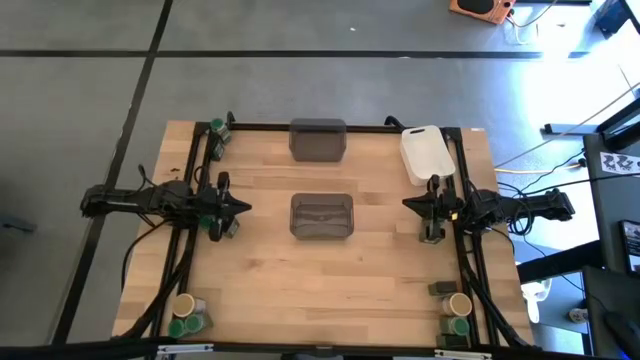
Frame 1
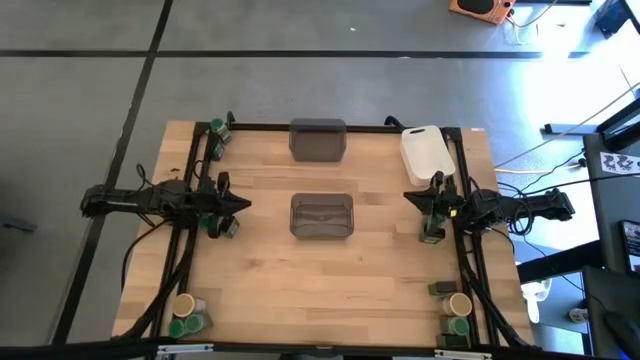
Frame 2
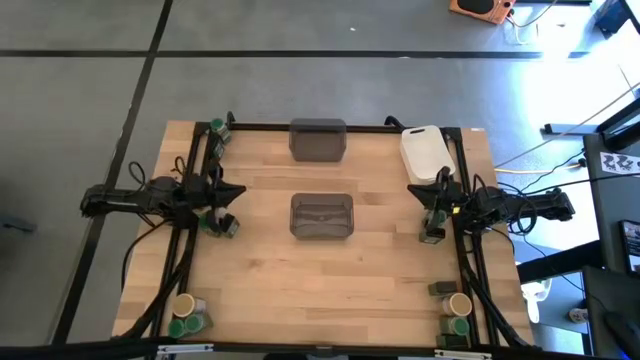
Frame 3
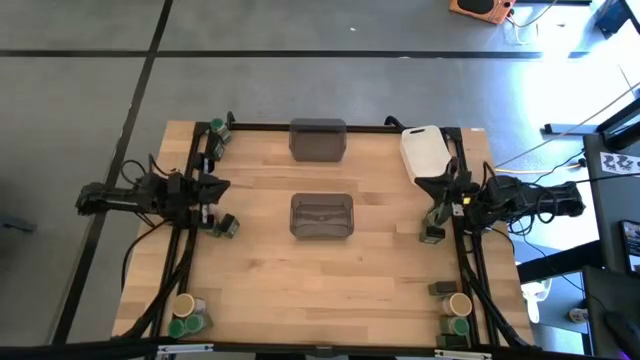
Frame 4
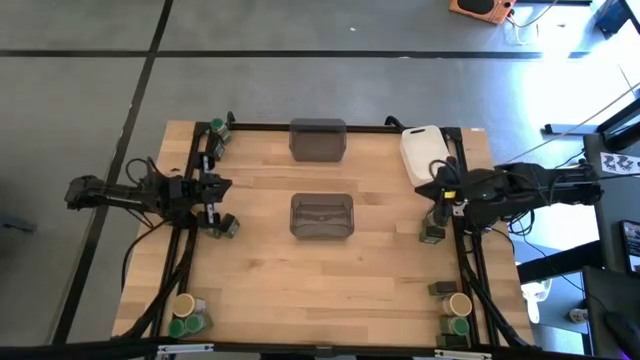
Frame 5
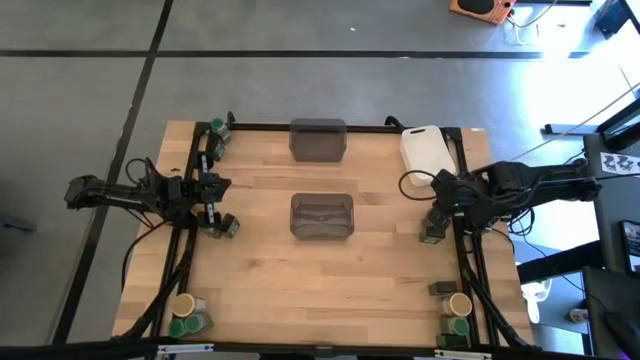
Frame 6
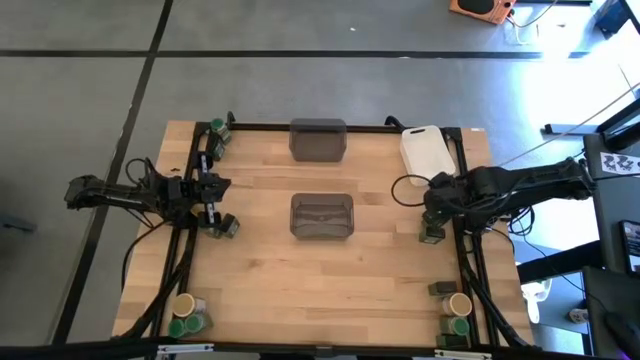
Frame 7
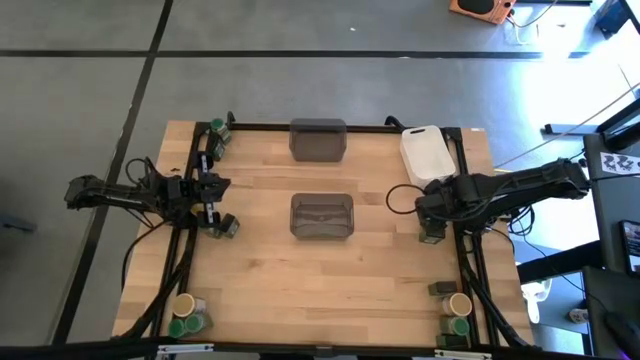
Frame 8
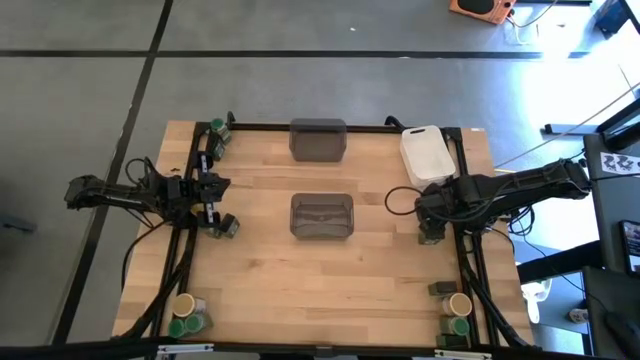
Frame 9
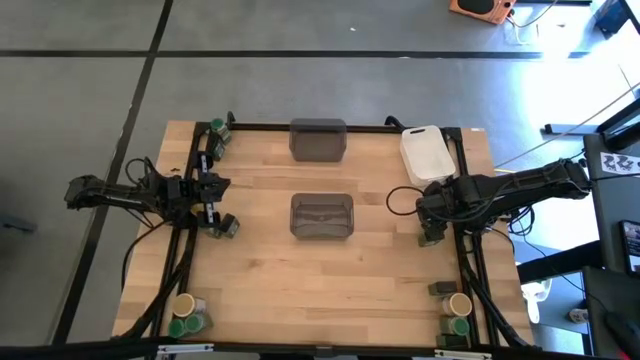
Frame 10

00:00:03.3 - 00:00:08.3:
Task: Sort spices by type
Put the green seasoning bottle into the white bin

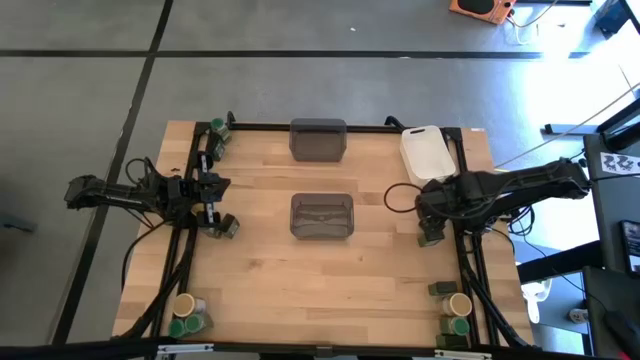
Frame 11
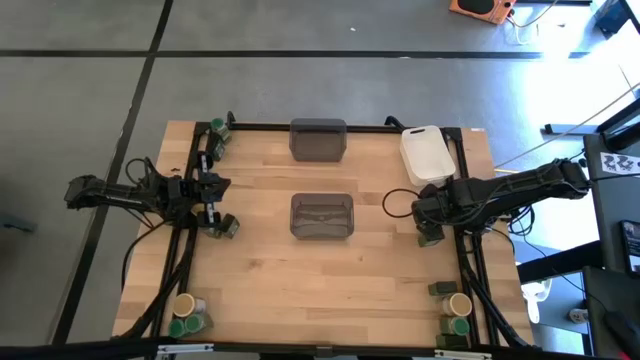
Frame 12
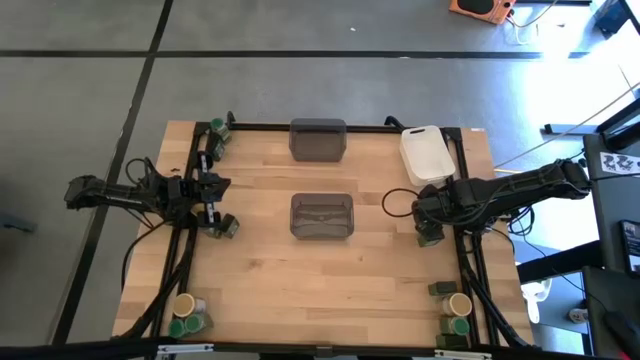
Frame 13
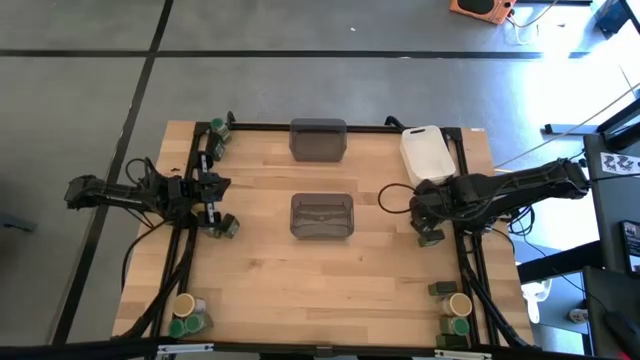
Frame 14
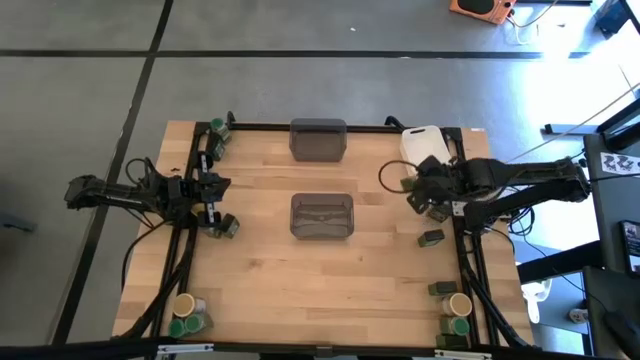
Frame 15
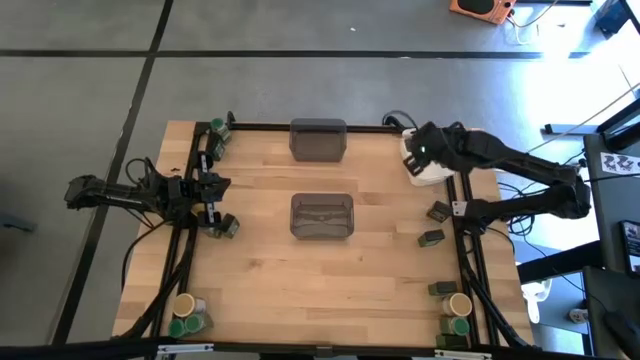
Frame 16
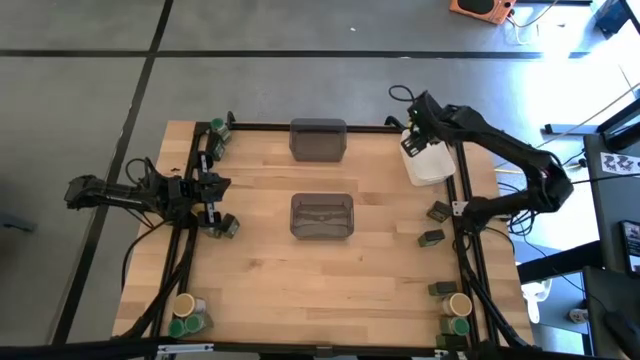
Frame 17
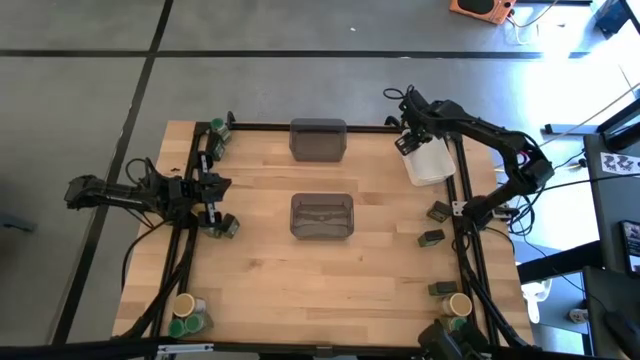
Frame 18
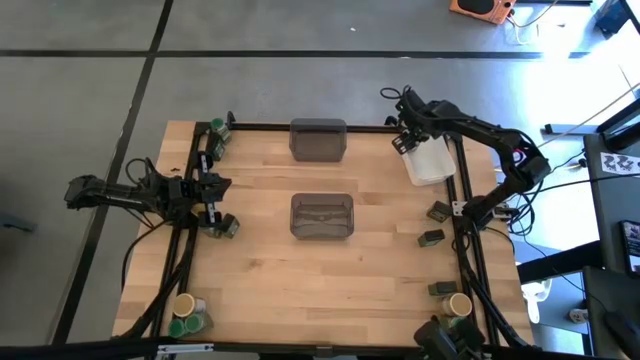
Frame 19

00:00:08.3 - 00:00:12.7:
Put the green seasoning bottle into the white bin

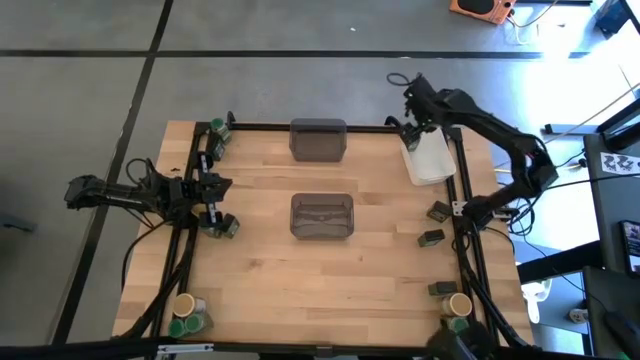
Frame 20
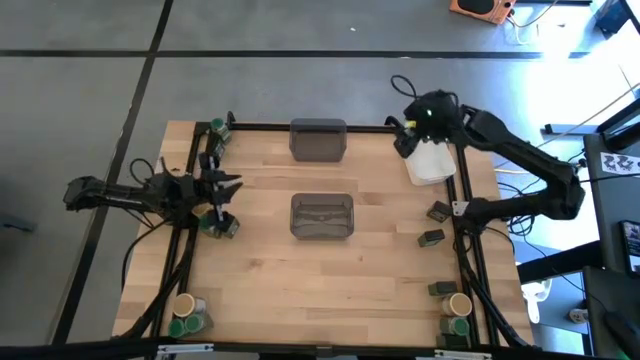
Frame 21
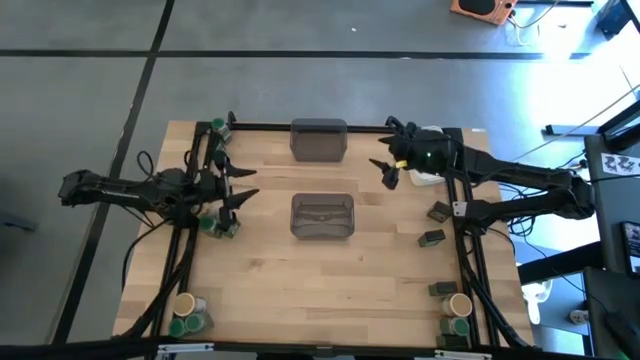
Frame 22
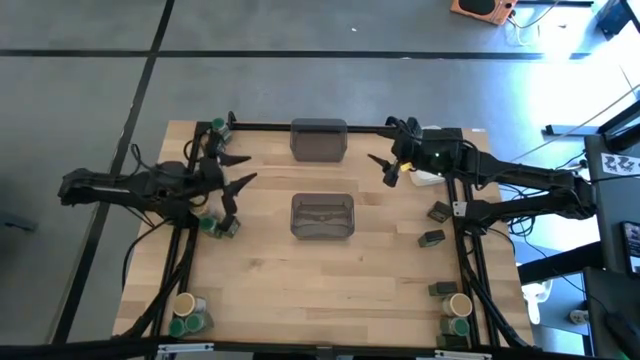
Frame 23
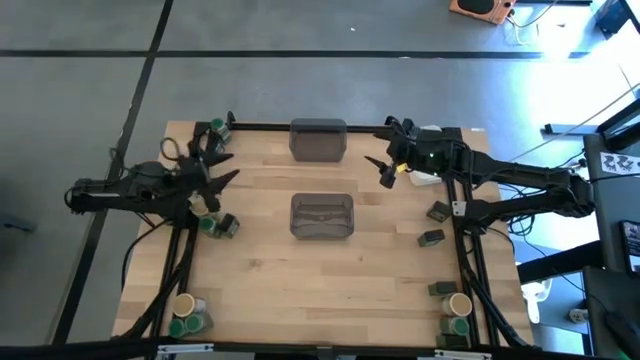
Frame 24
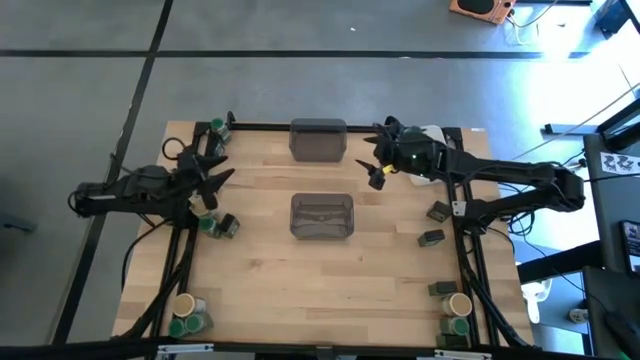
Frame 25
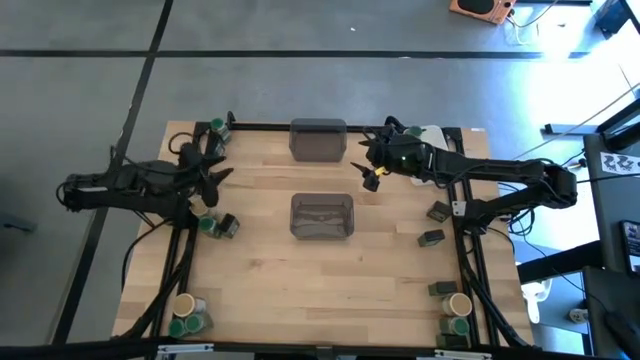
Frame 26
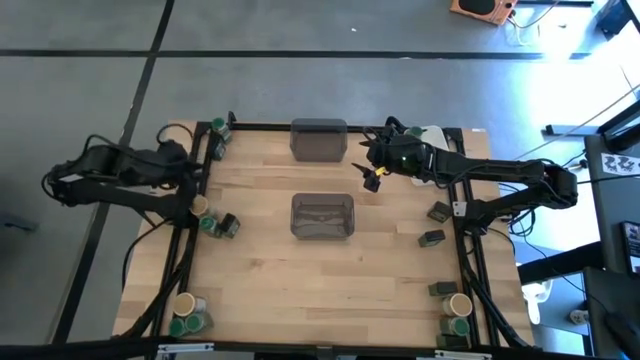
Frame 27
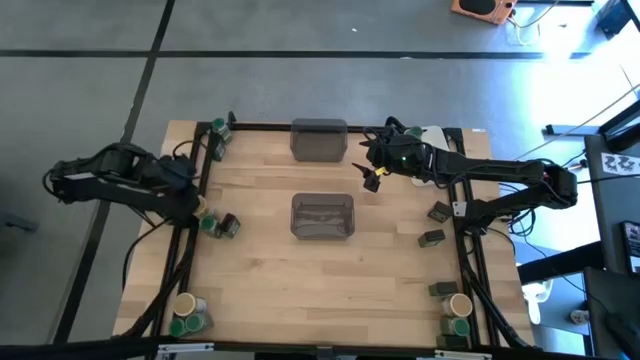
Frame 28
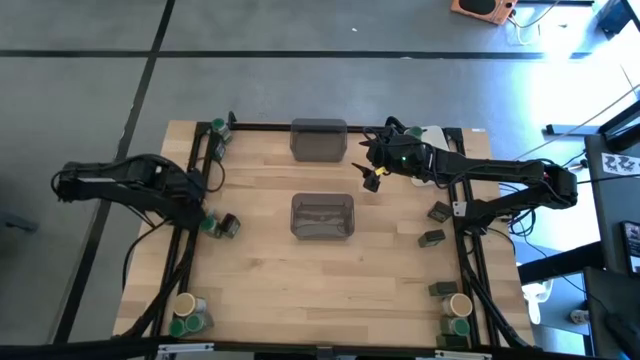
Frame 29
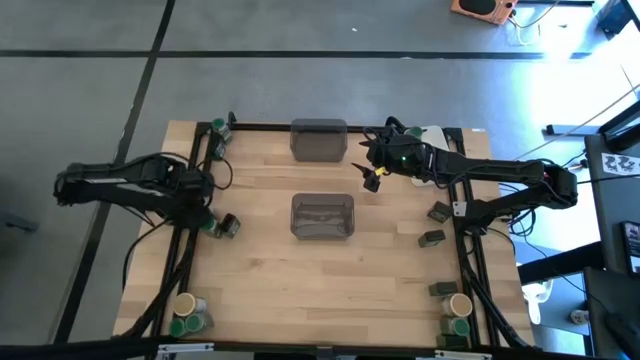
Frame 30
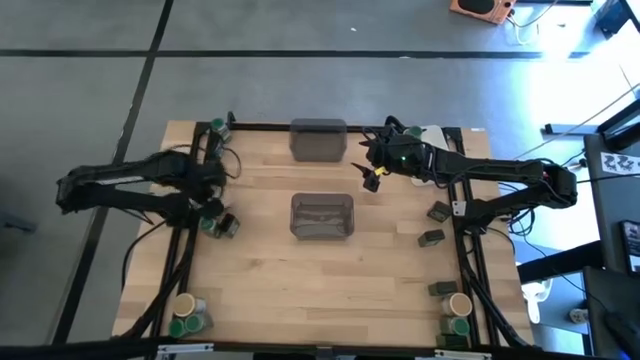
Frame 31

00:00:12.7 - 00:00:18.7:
Put the golden seasoning bottle into the bottom black bin

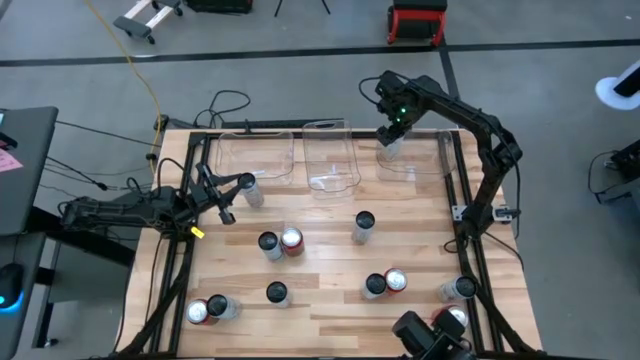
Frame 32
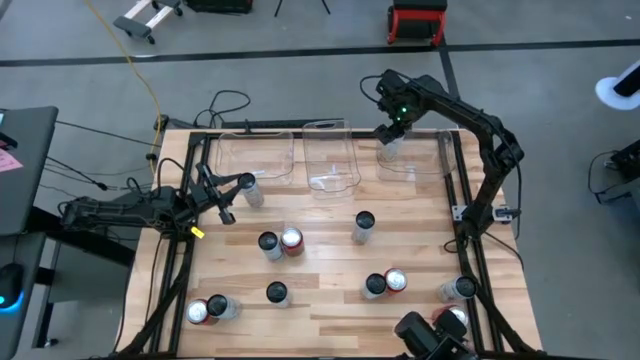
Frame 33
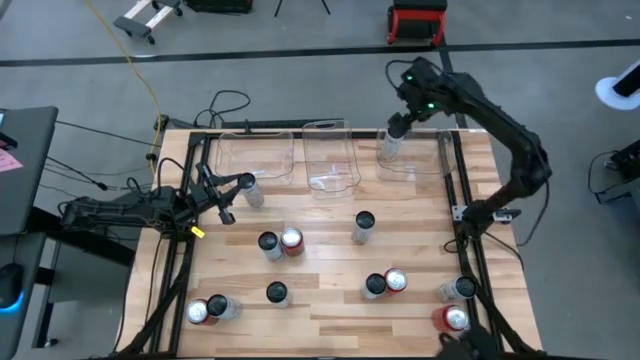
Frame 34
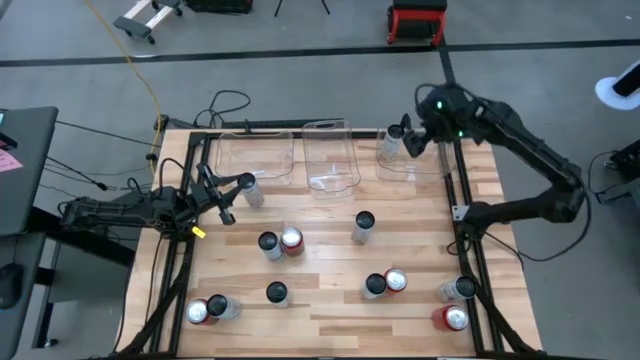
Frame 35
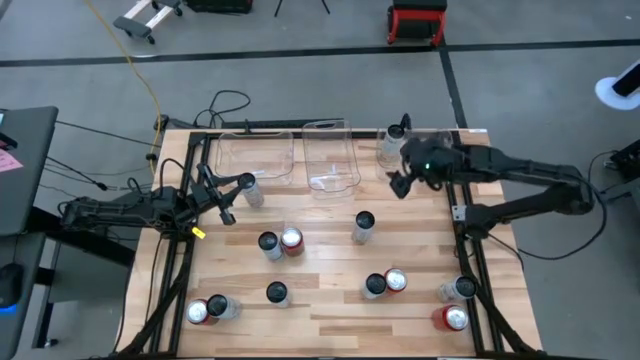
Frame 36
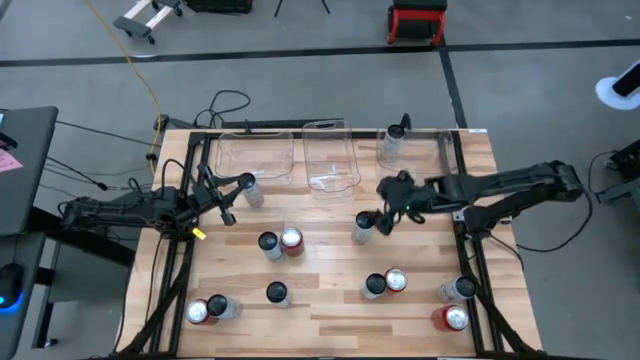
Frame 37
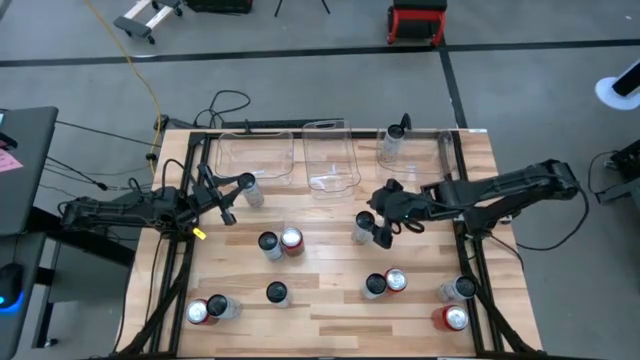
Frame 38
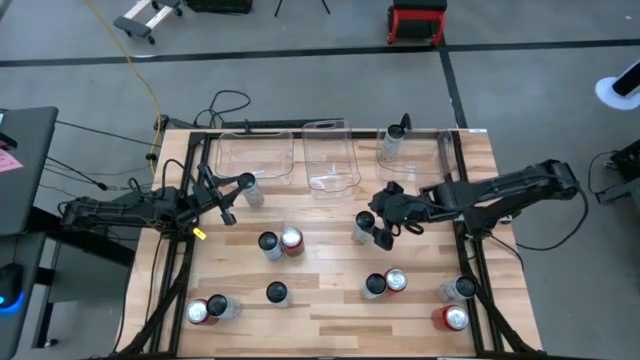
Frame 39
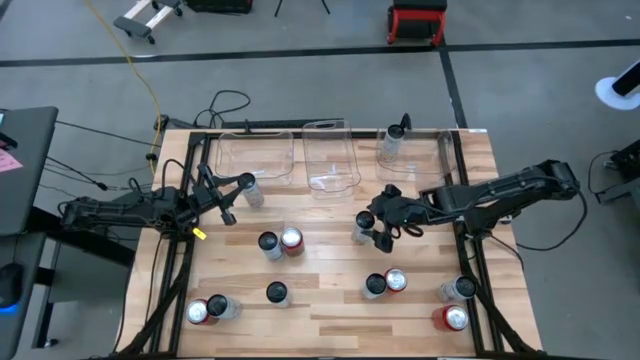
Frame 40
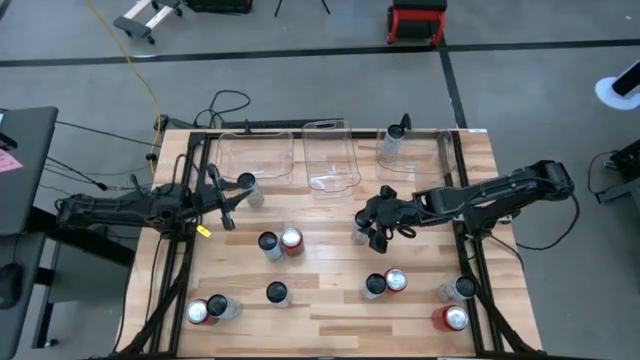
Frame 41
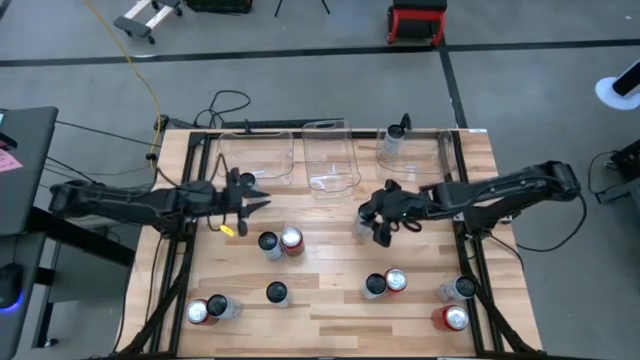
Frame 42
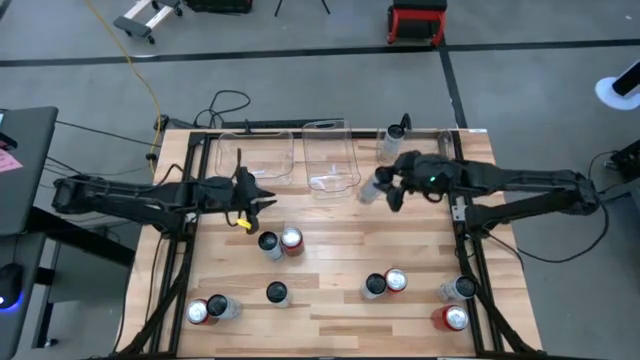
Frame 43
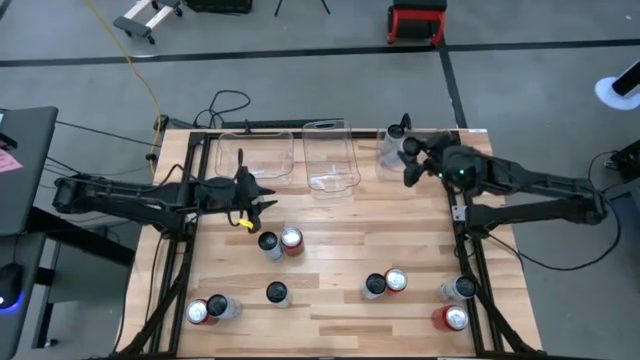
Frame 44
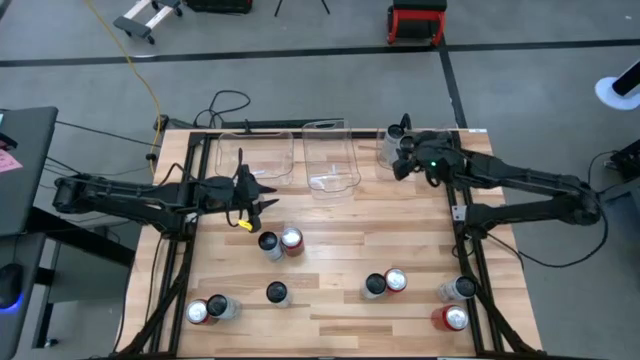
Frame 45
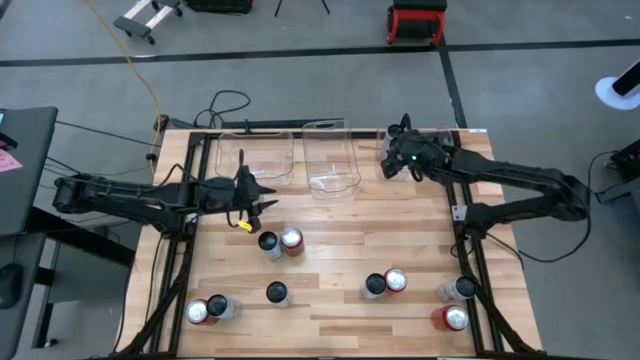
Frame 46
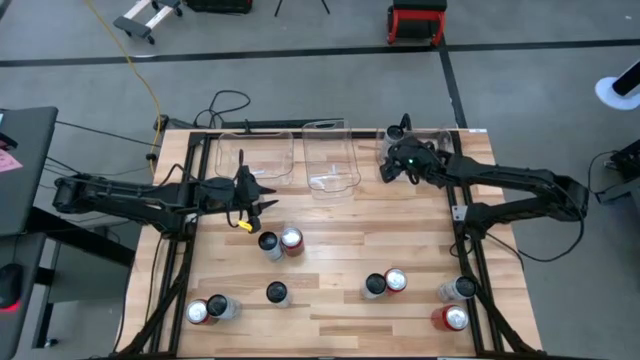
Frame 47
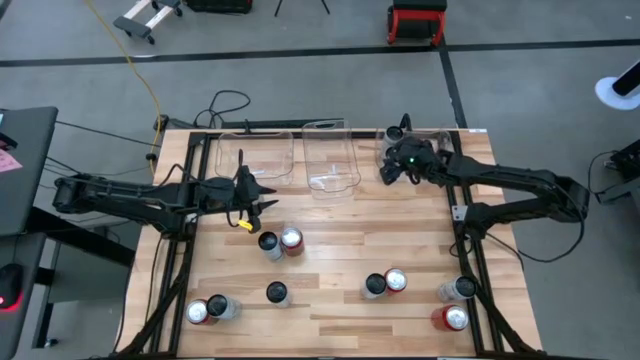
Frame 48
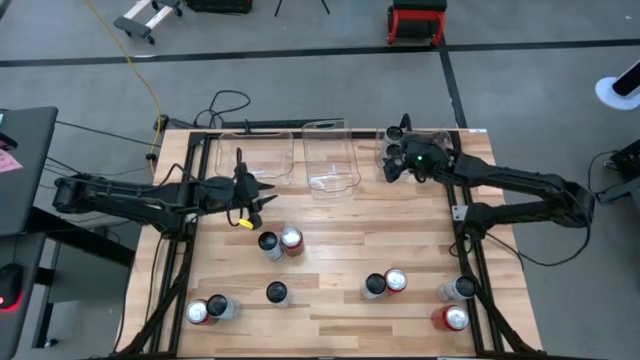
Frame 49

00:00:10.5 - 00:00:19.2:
Task: Sort soda cans
Put the white-yellow soda can into the right transparent bin
